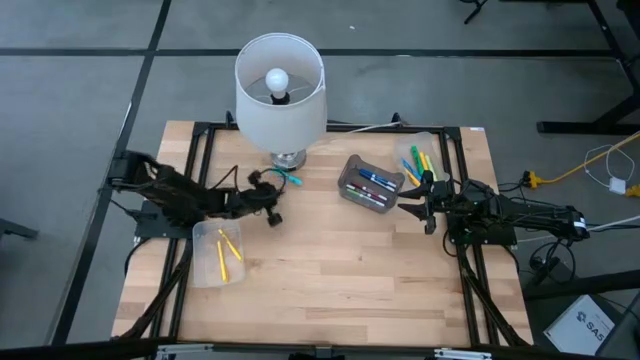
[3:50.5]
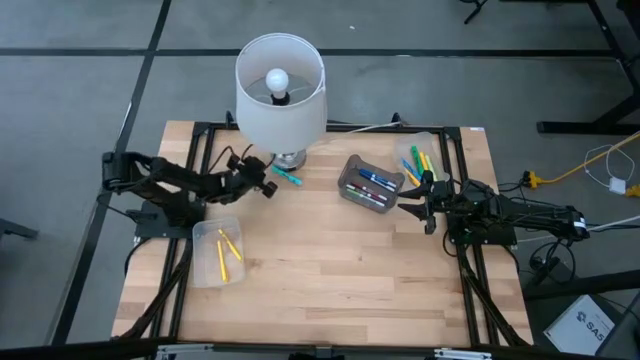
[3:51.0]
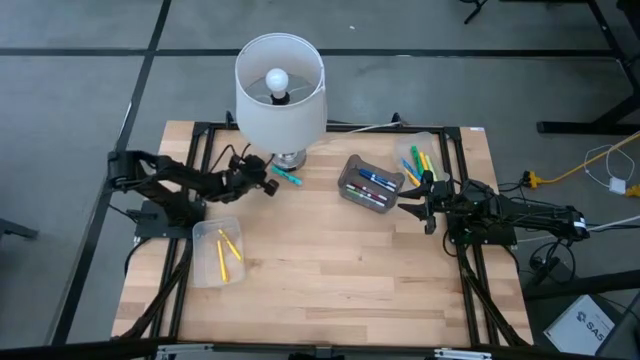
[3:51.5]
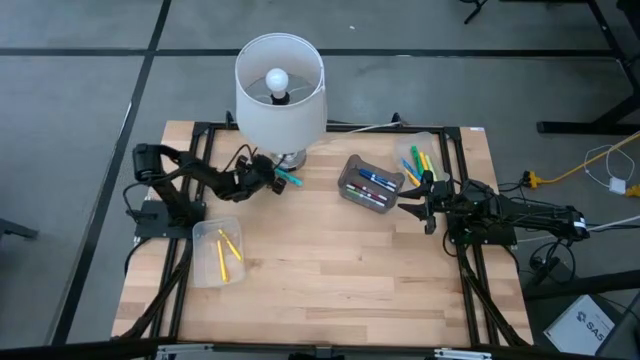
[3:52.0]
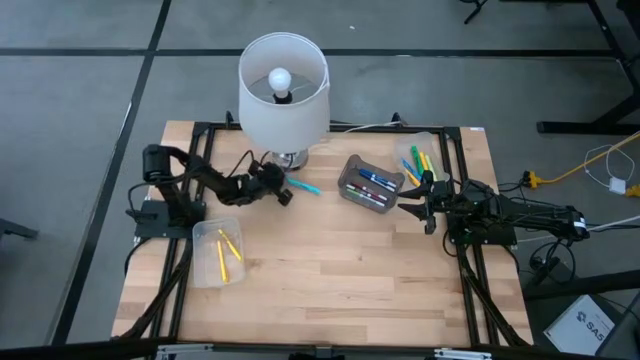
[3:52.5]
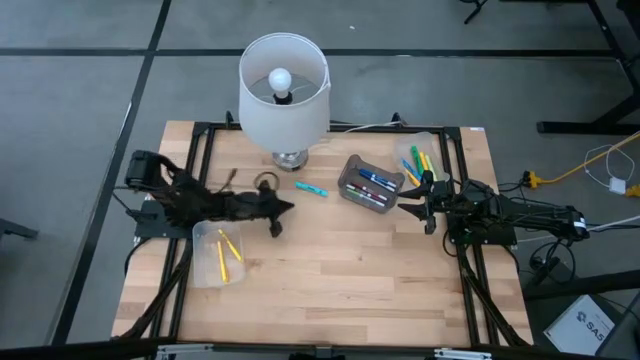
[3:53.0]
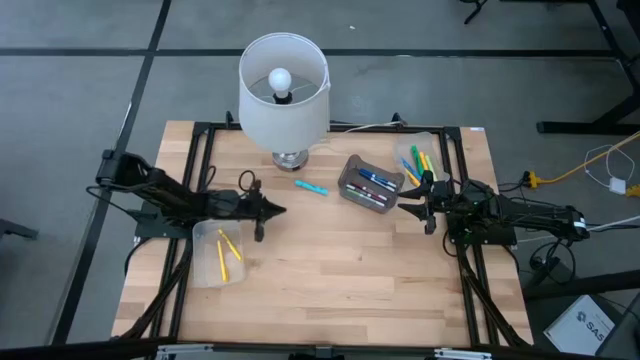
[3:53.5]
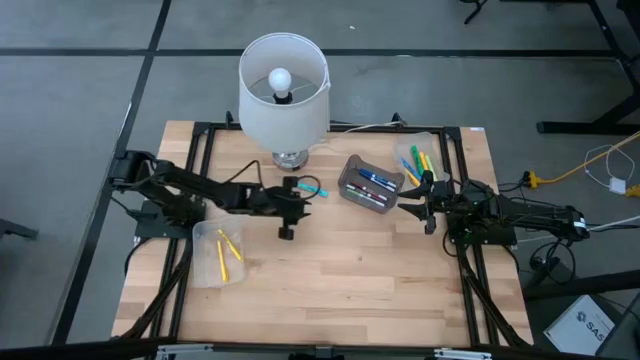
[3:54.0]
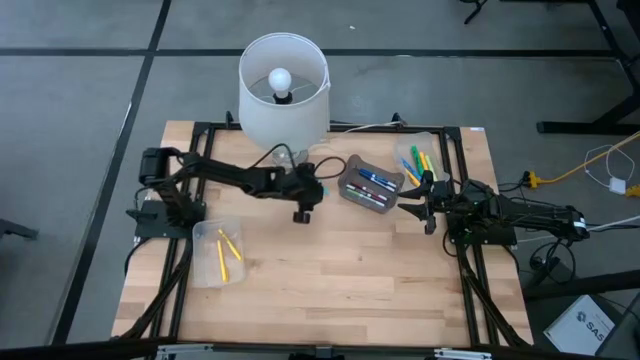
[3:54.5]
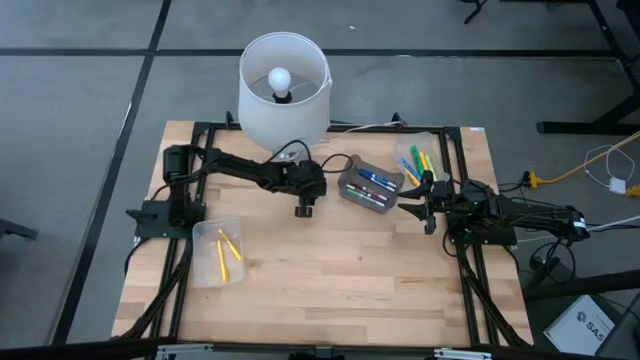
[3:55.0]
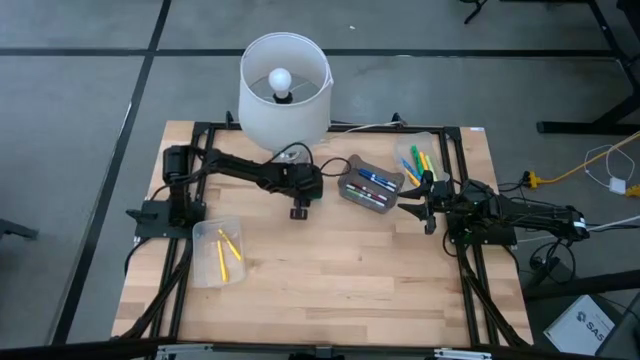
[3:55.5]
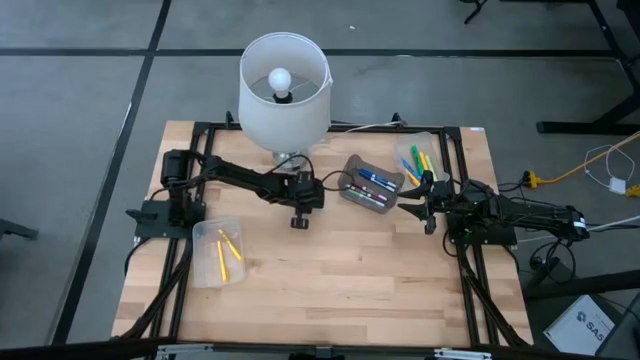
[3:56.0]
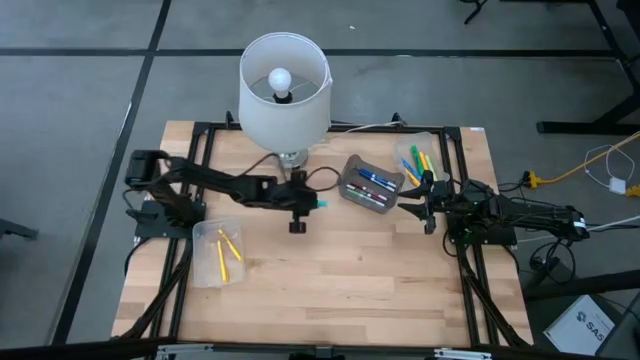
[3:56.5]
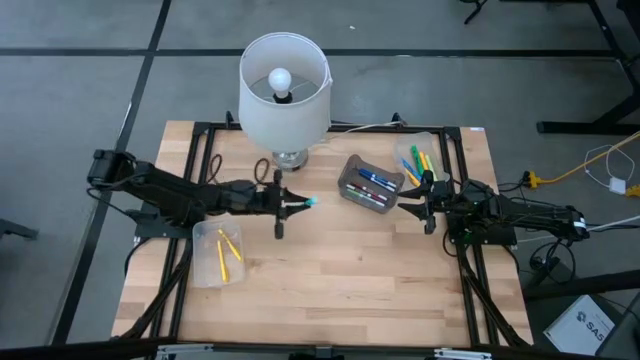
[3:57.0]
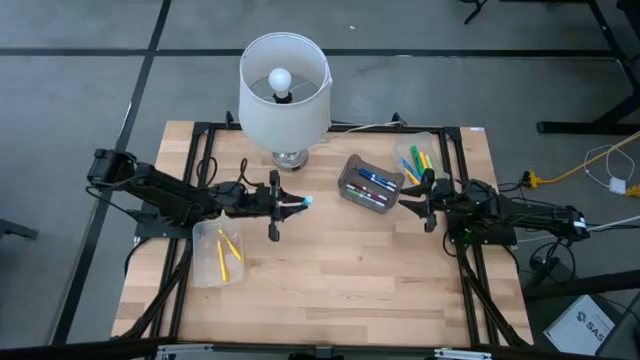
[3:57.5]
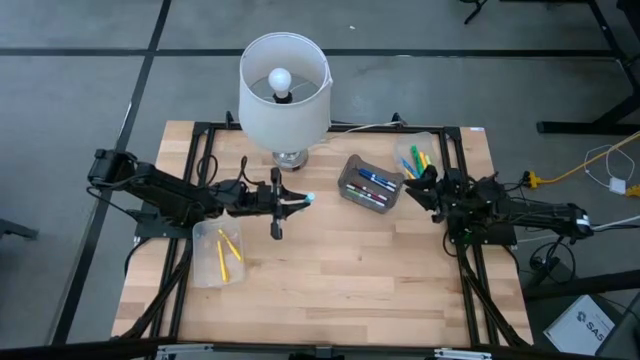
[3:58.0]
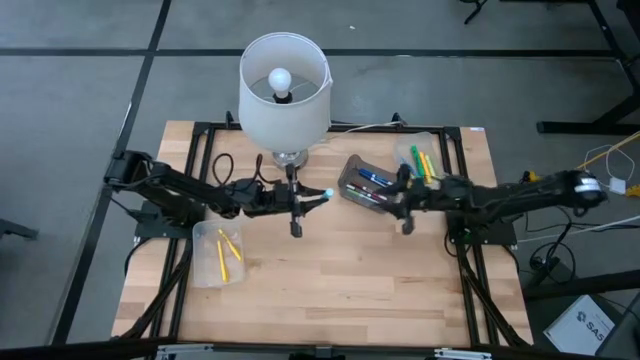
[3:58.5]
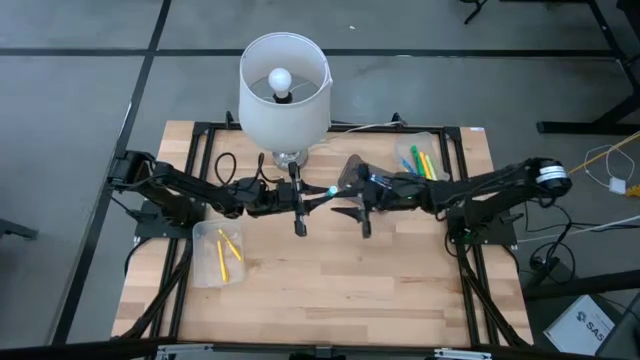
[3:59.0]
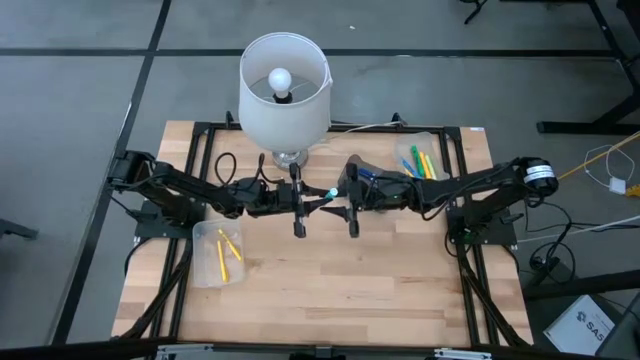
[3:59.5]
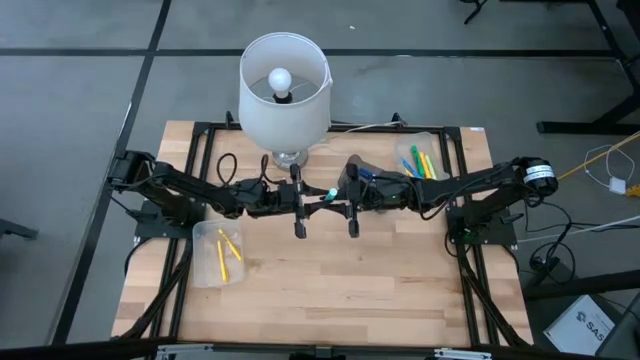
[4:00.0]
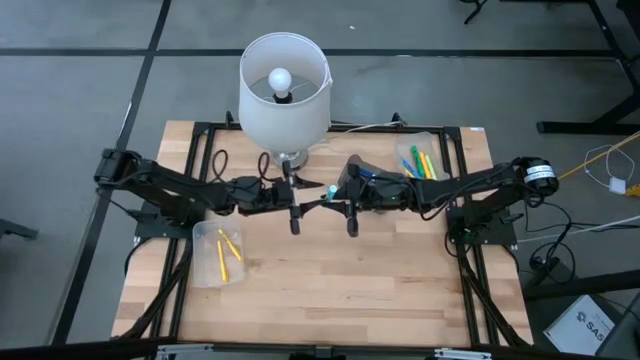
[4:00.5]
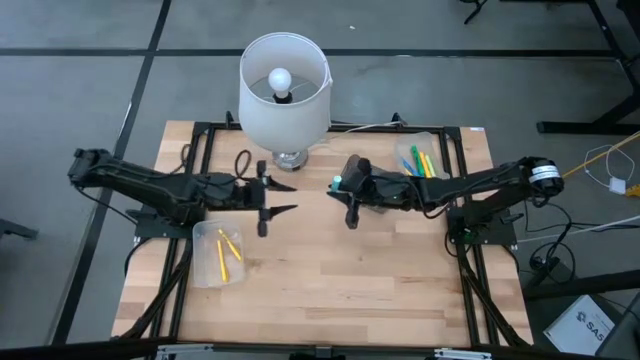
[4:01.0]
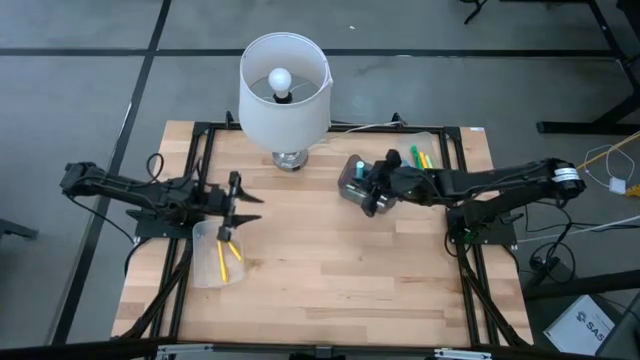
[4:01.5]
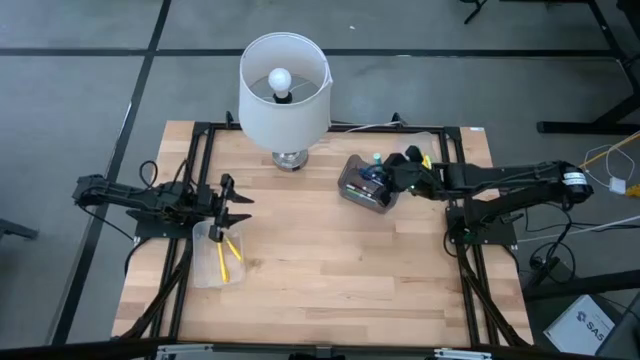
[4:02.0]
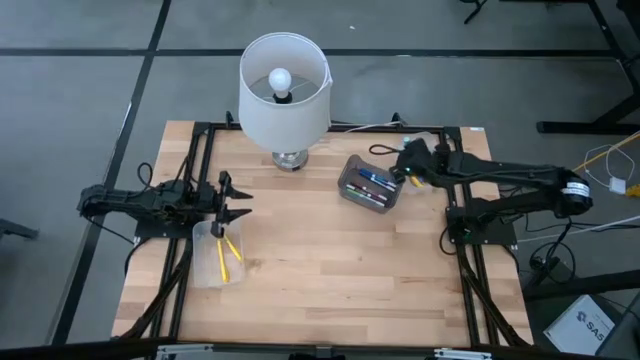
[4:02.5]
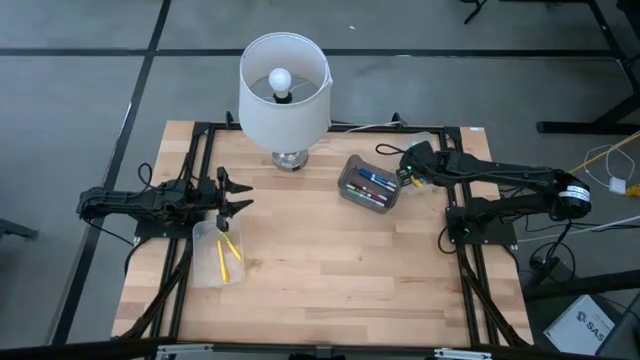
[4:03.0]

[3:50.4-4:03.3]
Task: Pick & Place Markers
Put the light blue highlighter pen into the right transparent bin

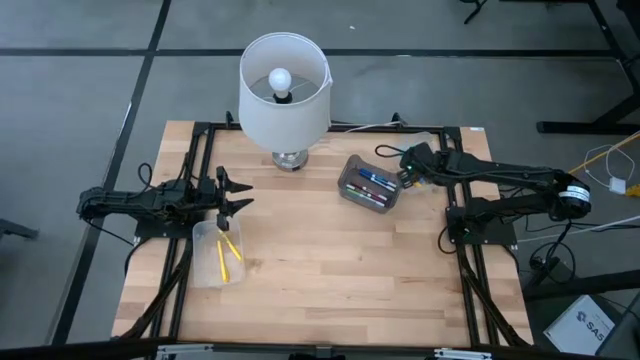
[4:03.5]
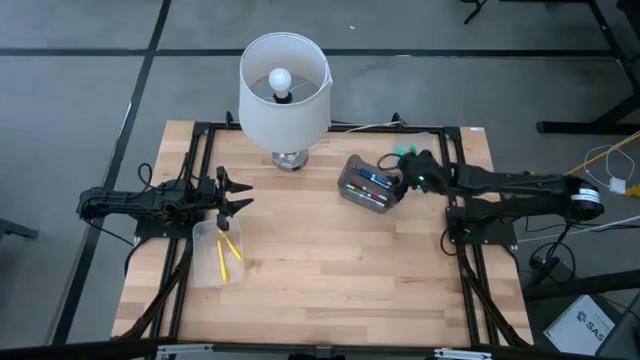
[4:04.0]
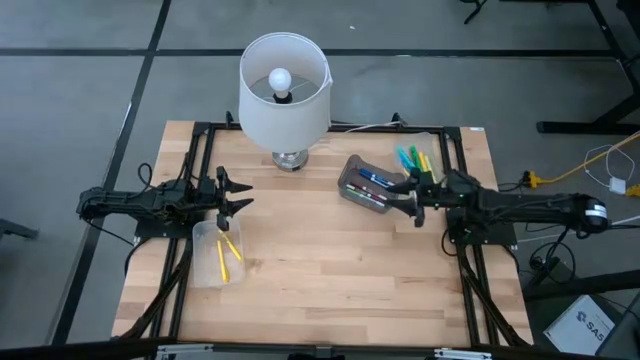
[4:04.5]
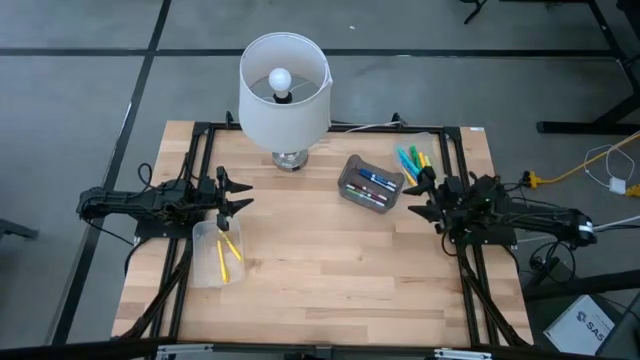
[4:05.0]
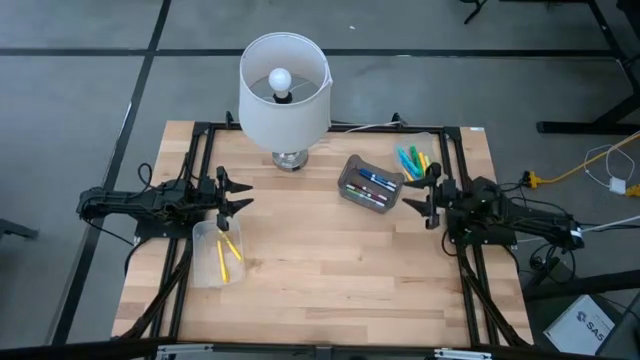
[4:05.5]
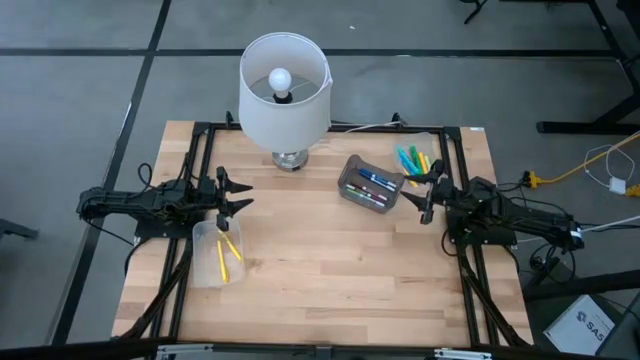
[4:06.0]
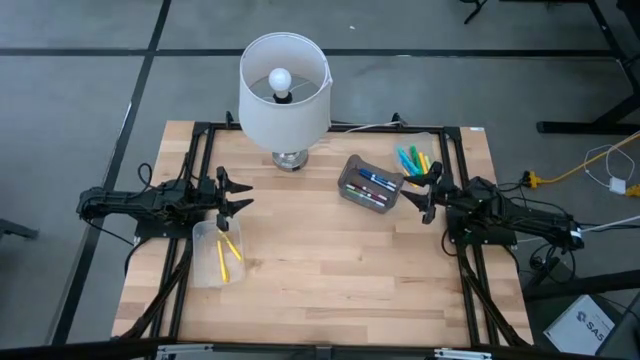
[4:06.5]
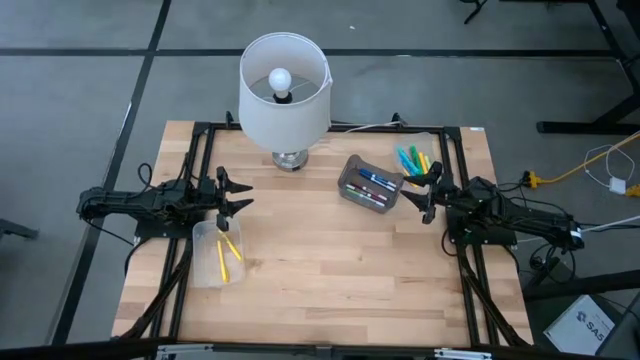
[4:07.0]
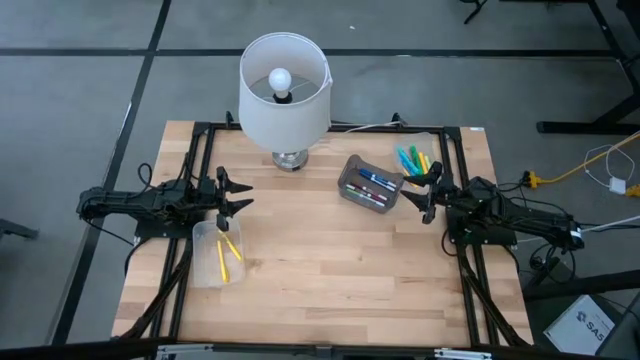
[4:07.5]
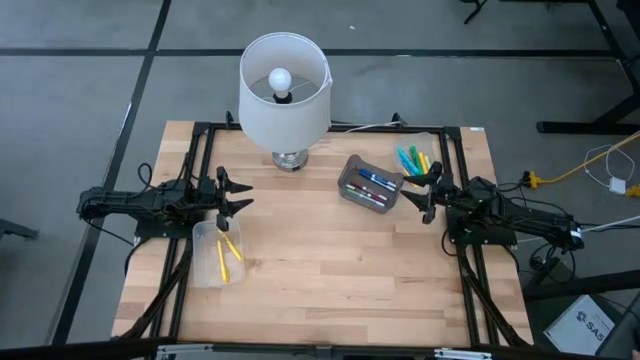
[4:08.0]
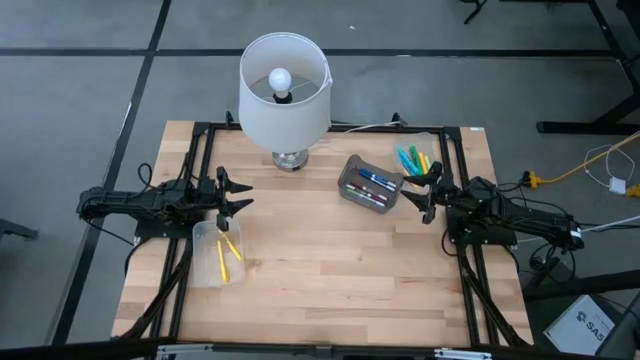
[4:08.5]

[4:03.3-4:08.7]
Return to Home Position

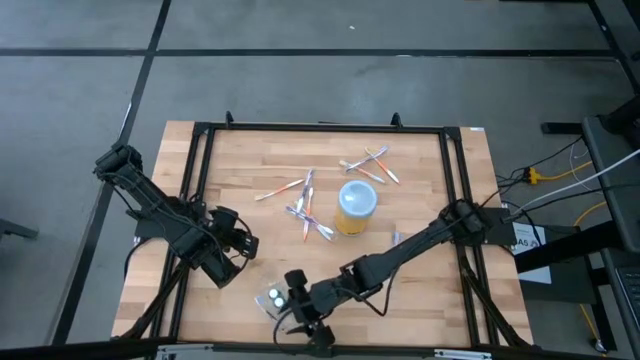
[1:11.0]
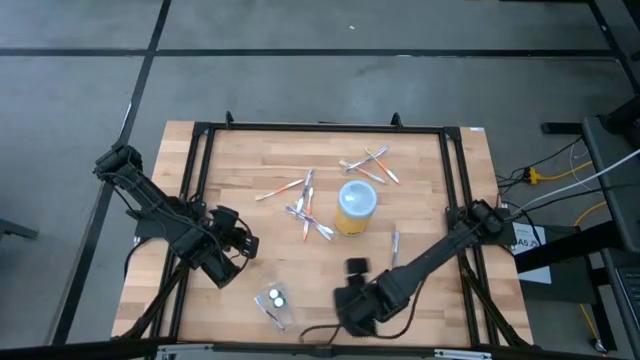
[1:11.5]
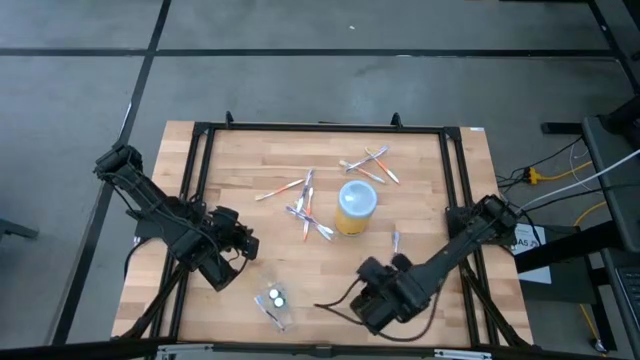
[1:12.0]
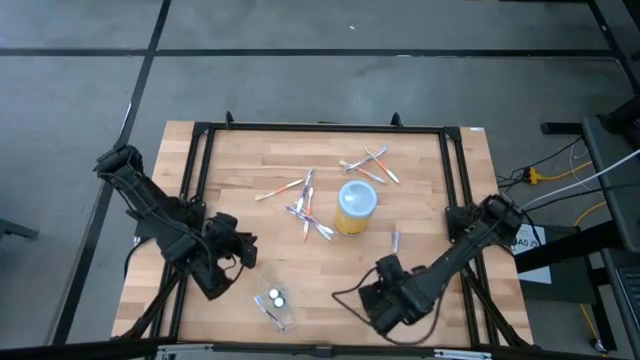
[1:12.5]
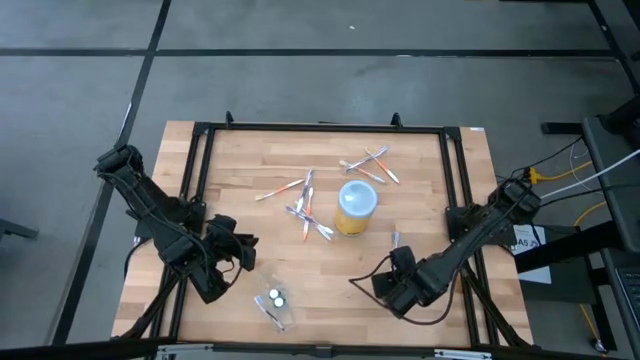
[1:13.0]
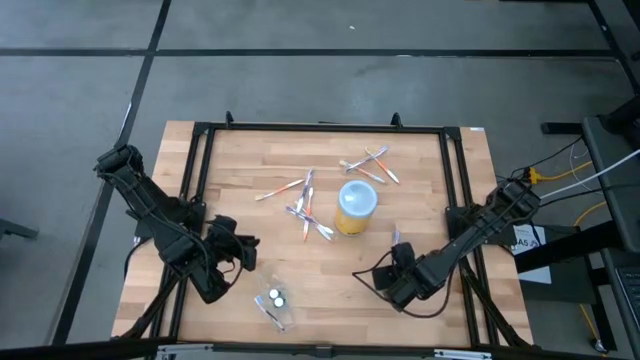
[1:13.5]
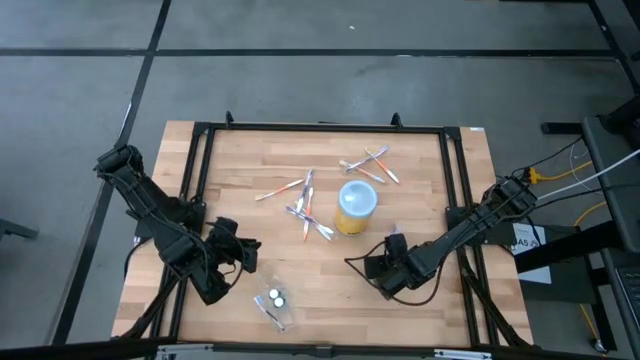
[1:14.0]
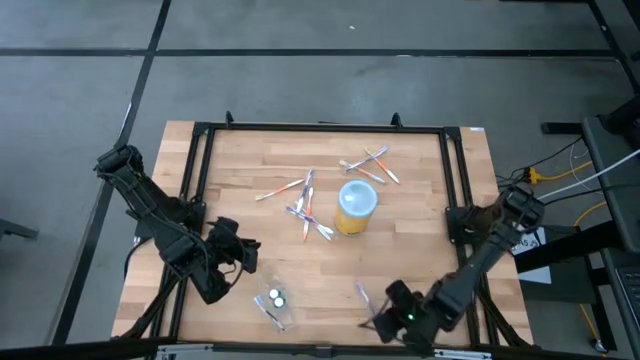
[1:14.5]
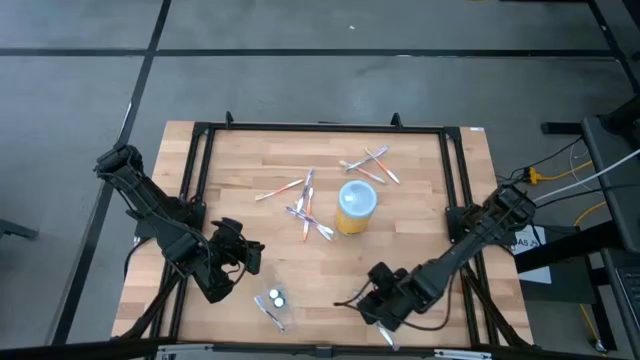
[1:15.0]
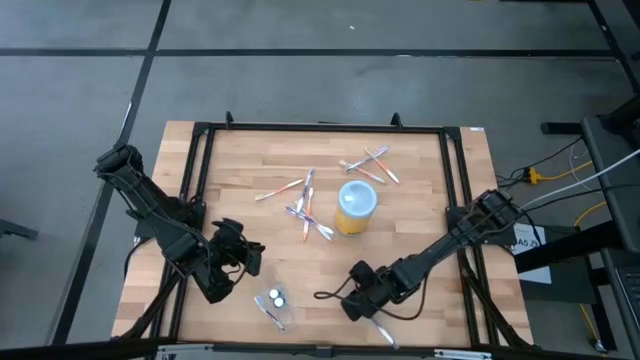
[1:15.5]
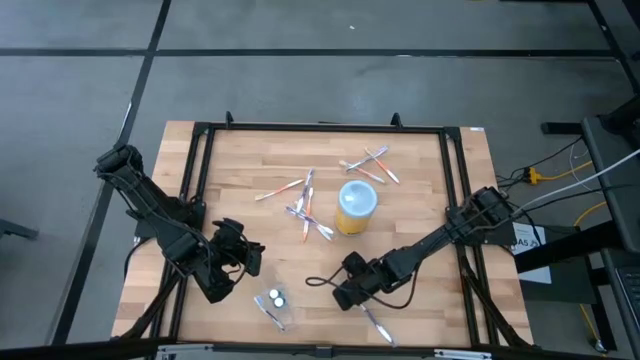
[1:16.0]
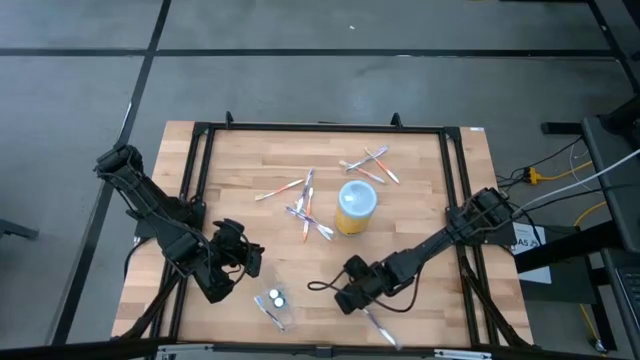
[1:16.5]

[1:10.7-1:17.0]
Task: Pick & Place toothbrushing station
Put the violet toothbrush into the right side of the transparent organizer
